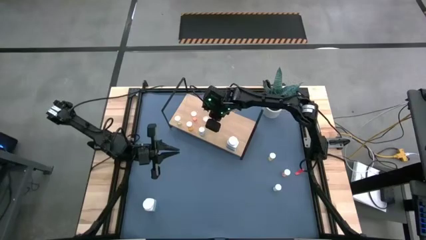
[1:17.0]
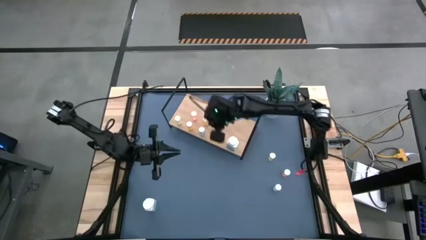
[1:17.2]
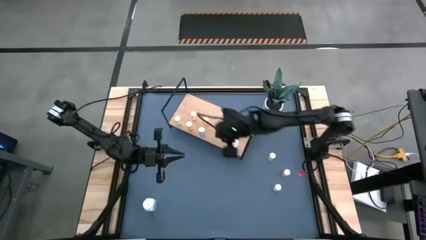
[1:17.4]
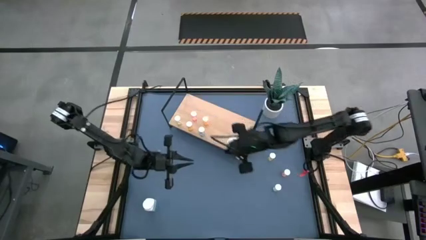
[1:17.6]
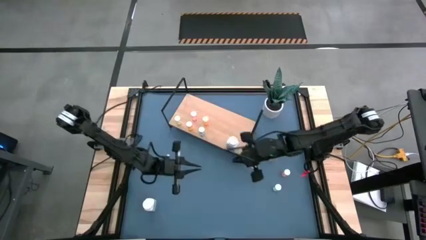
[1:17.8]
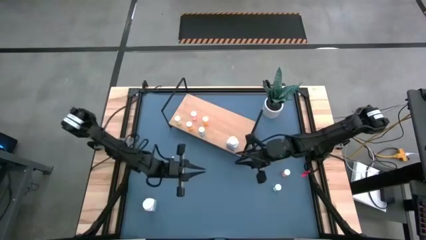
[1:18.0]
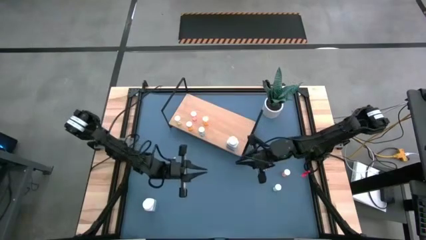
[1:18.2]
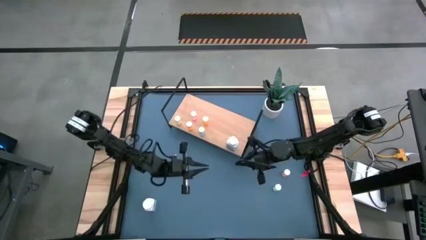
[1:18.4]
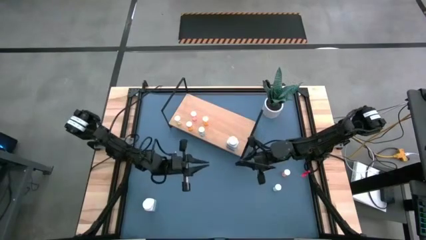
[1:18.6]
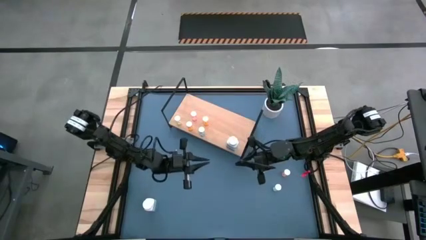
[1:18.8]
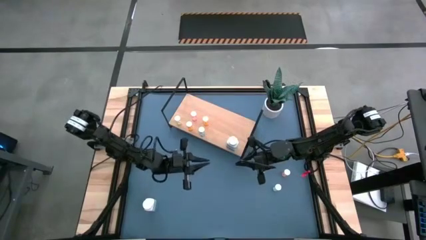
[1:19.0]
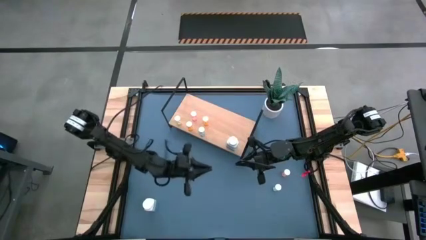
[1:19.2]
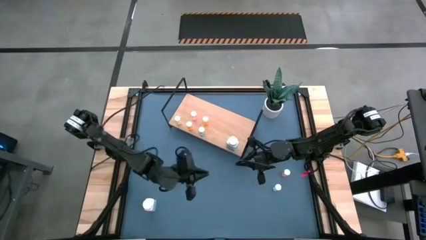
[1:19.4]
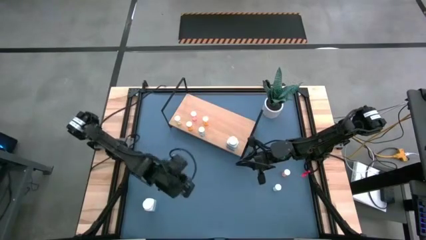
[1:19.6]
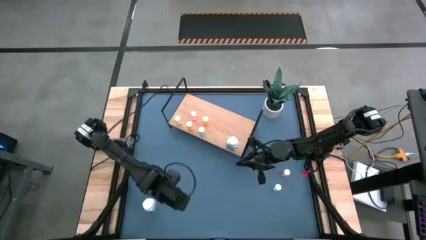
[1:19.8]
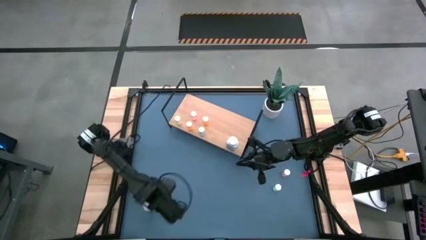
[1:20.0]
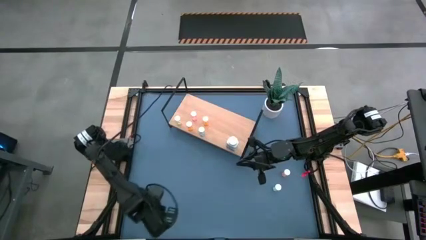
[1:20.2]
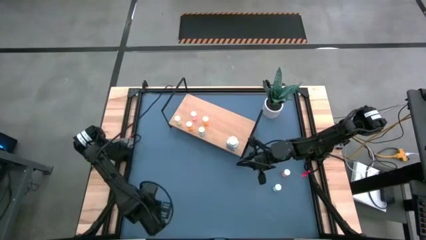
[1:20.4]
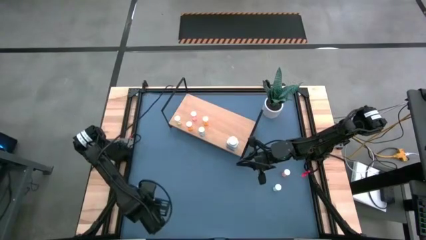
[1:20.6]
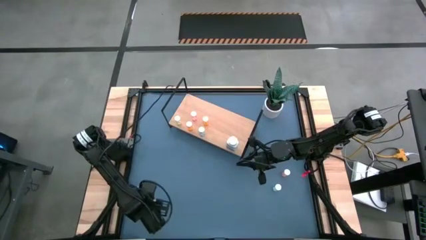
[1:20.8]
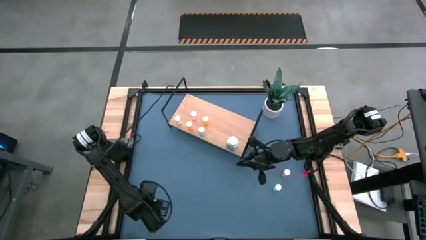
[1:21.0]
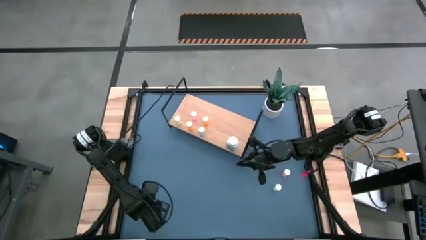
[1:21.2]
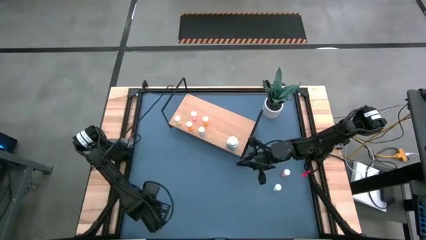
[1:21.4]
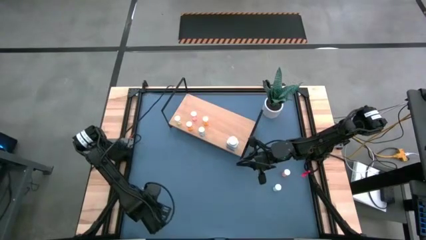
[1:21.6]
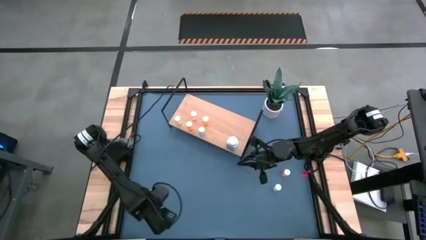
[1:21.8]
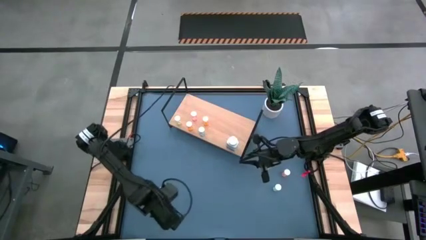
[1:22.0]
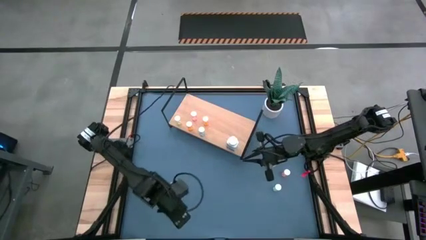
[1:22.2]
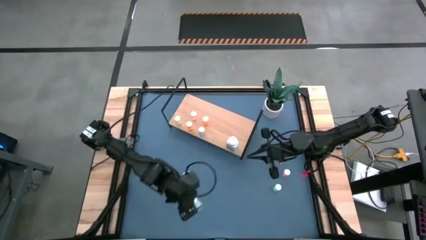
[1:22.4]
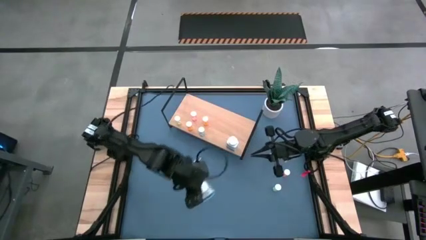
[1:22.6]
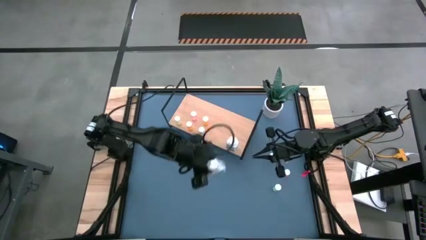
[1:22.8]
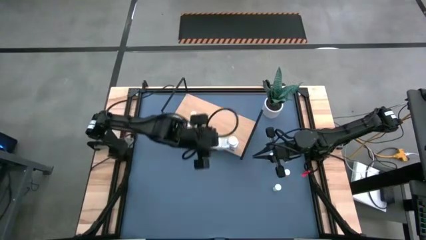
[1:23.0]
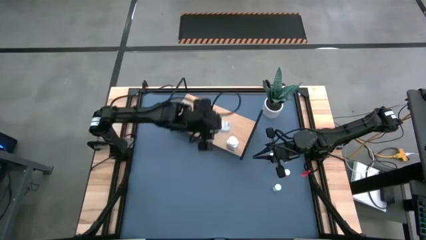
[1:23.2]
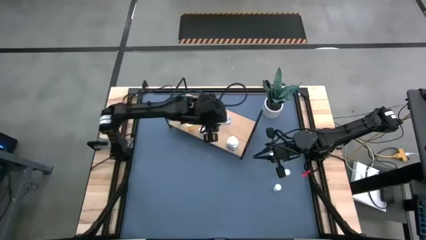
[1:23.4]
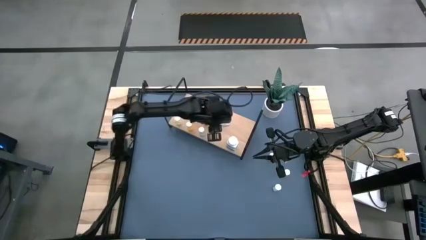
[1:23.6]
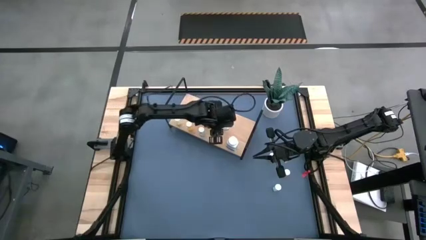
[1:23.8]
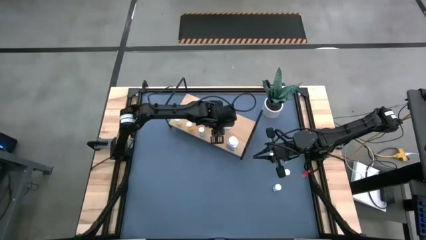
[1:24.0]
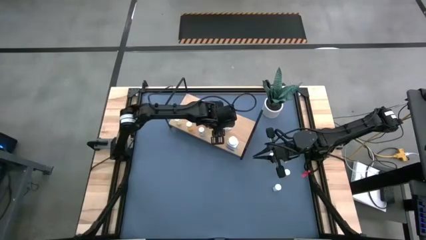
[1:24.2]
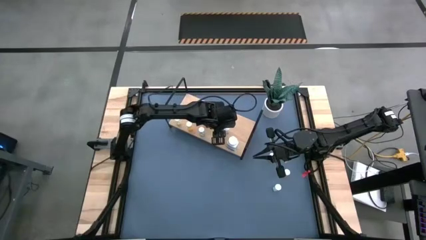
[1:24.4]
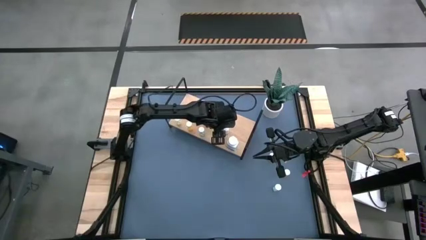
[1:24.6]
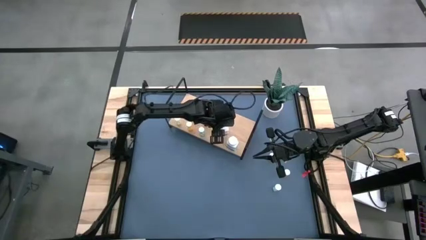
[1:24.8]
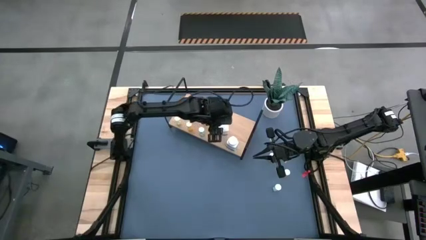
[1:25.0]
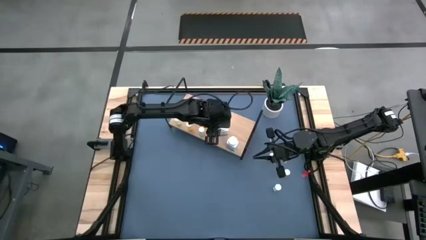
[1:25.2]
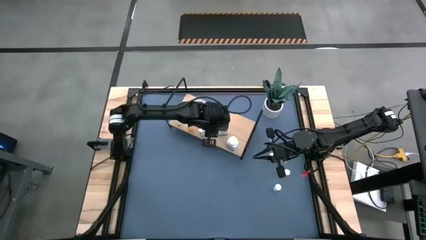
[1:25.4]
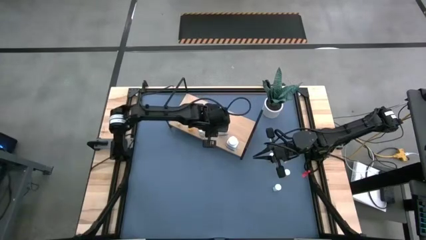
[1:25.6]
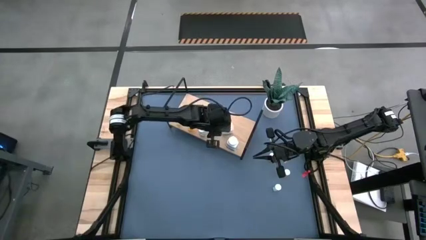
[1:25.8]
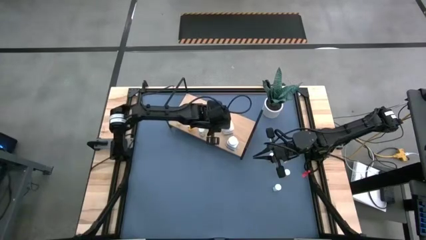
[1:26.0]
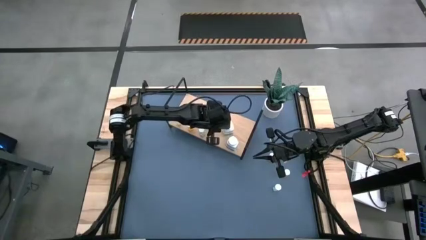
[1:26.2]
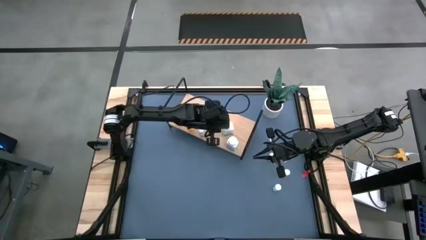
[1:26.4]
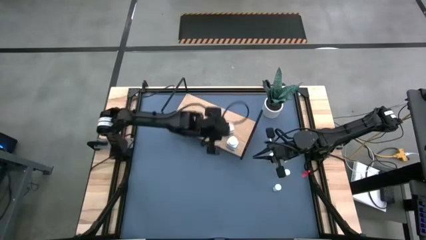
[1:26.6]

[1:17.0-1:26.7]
Task: Pick and place medicine bottles onto shelf by color
Put the white pill bottle on the shelf

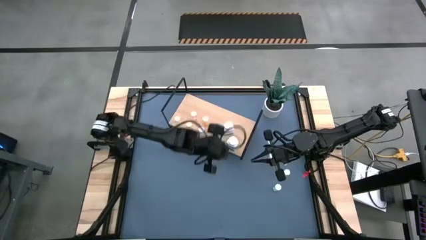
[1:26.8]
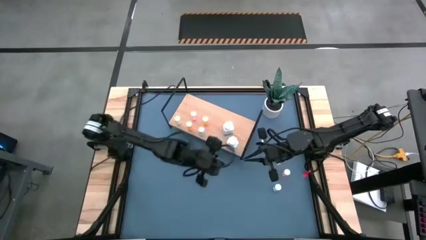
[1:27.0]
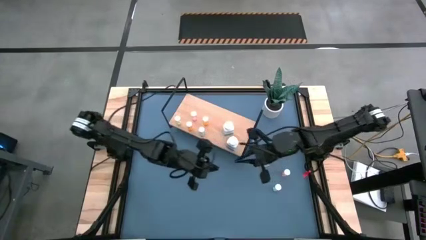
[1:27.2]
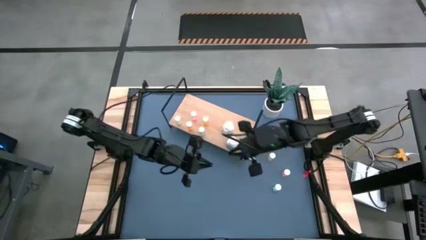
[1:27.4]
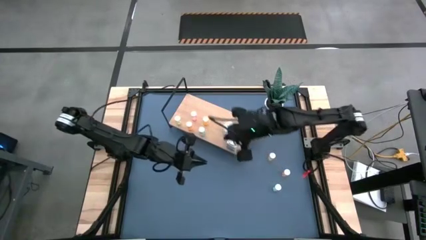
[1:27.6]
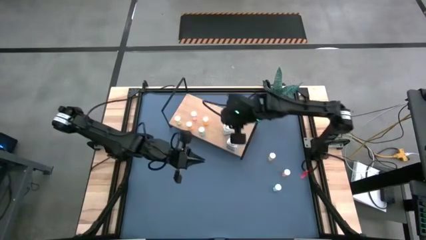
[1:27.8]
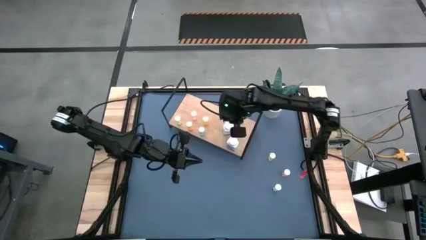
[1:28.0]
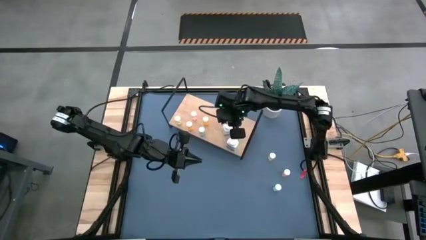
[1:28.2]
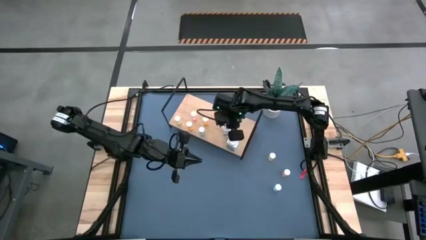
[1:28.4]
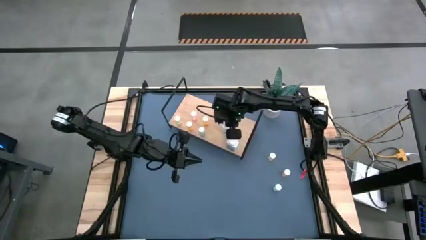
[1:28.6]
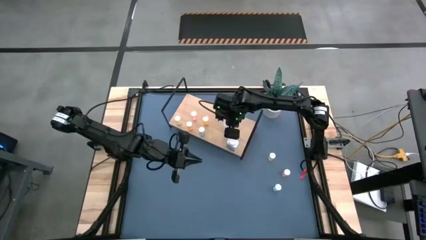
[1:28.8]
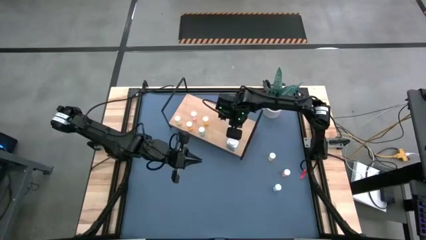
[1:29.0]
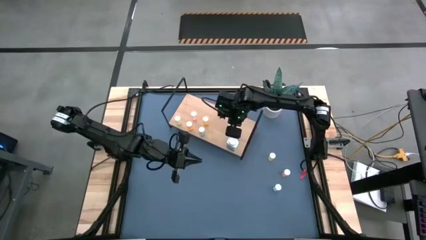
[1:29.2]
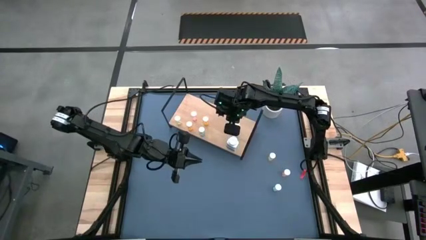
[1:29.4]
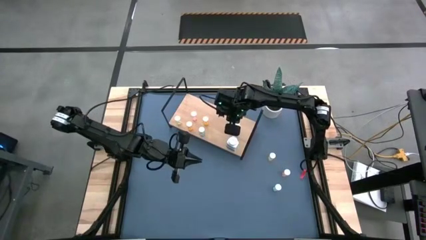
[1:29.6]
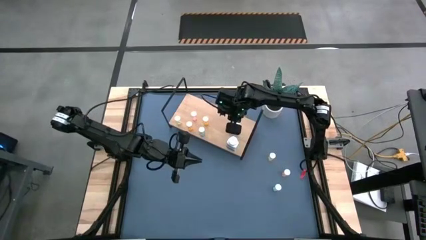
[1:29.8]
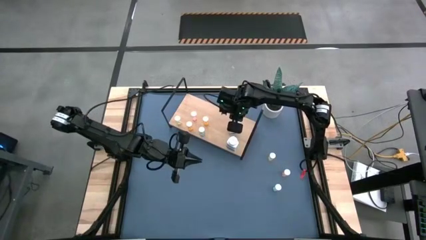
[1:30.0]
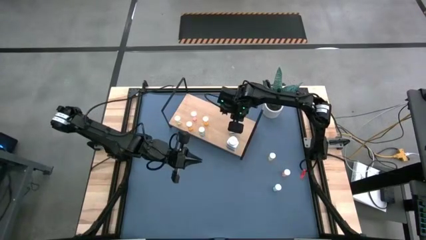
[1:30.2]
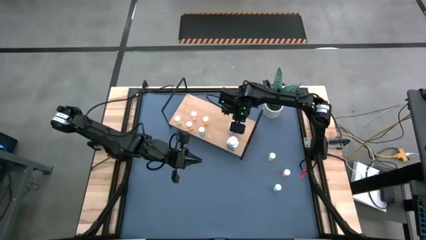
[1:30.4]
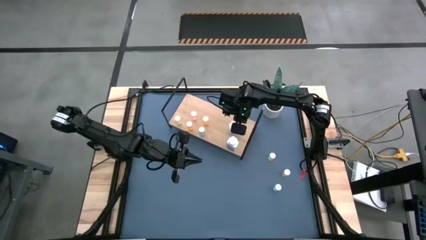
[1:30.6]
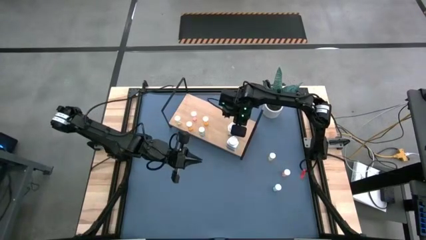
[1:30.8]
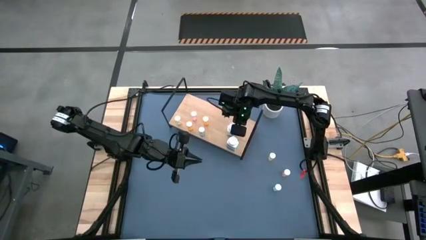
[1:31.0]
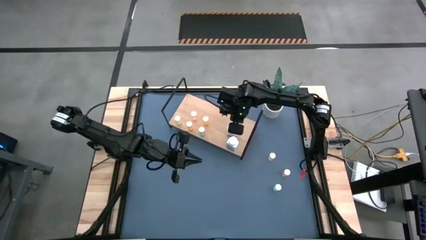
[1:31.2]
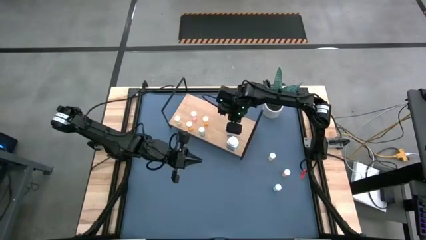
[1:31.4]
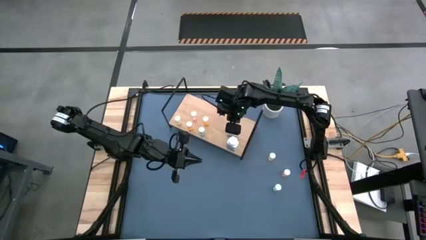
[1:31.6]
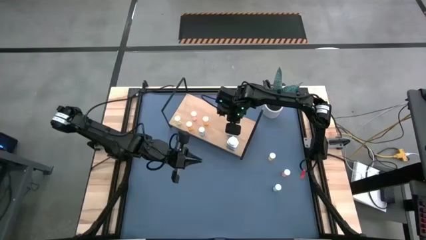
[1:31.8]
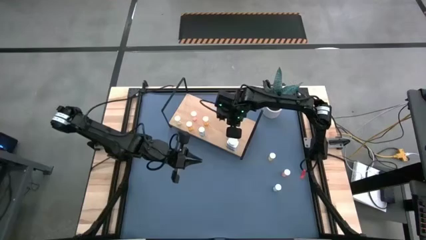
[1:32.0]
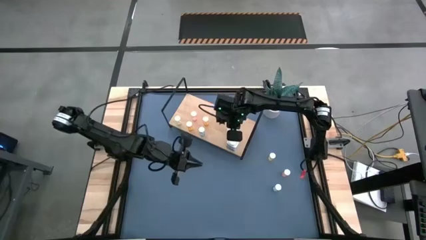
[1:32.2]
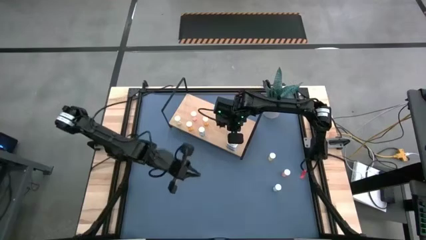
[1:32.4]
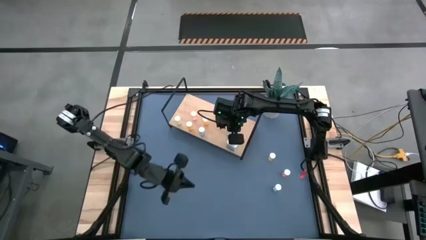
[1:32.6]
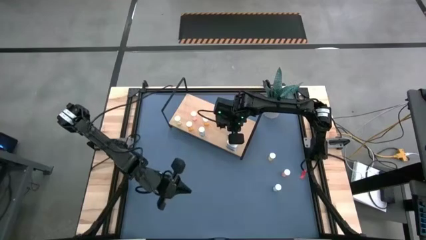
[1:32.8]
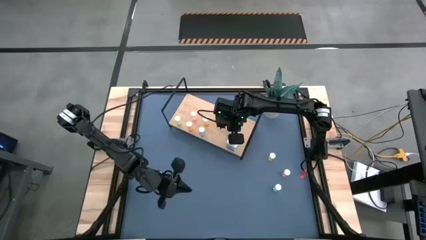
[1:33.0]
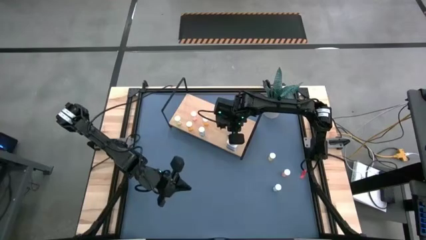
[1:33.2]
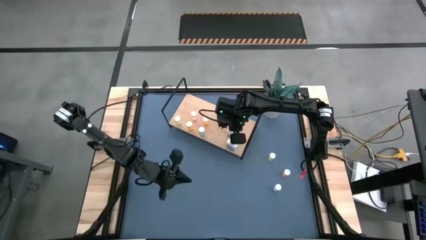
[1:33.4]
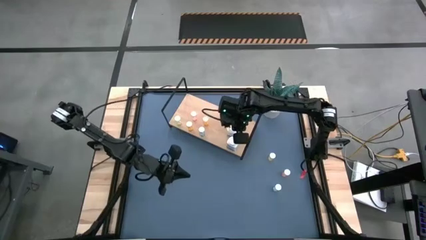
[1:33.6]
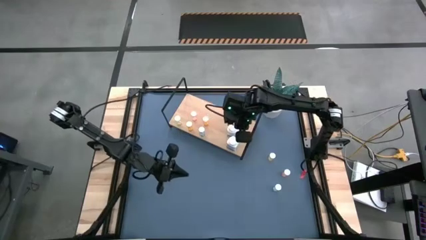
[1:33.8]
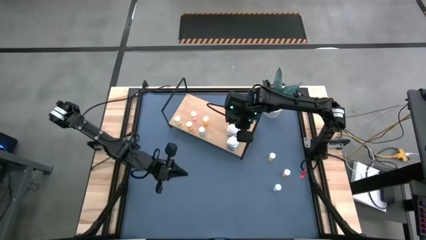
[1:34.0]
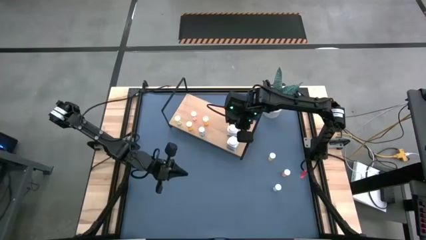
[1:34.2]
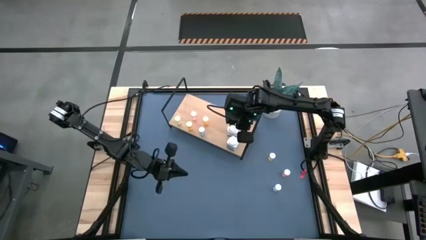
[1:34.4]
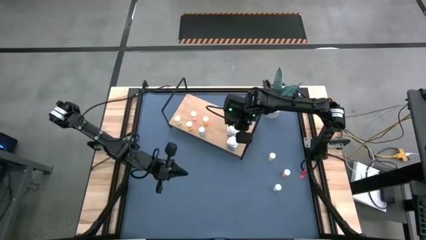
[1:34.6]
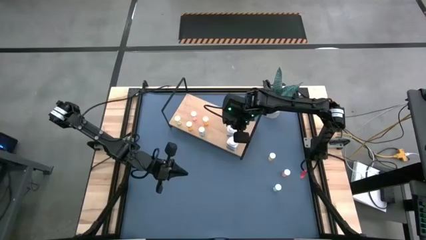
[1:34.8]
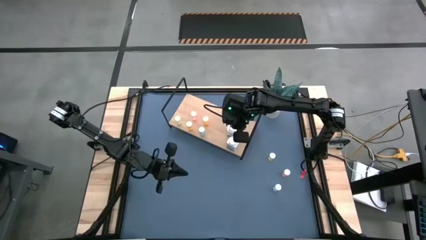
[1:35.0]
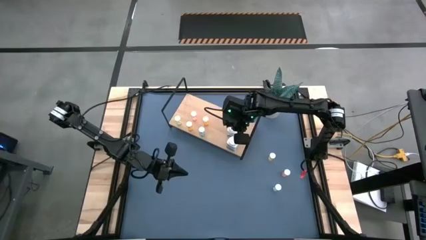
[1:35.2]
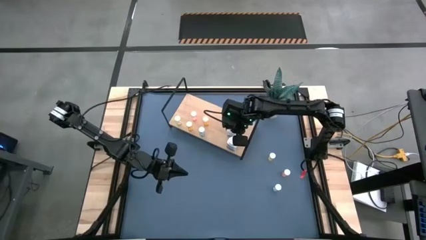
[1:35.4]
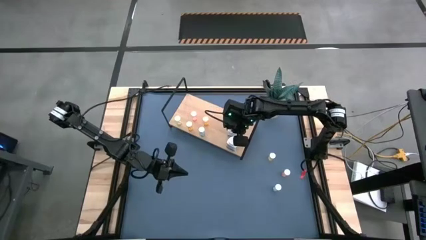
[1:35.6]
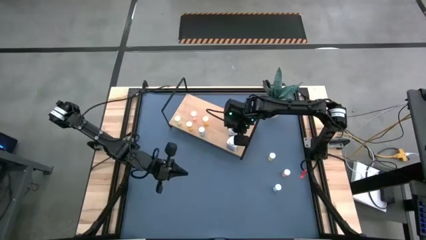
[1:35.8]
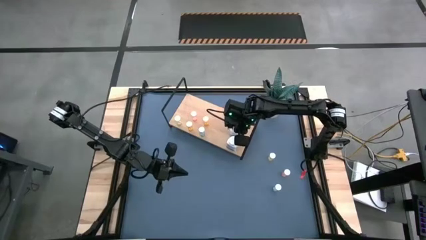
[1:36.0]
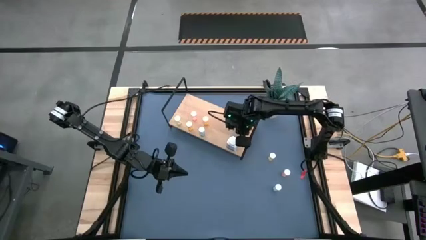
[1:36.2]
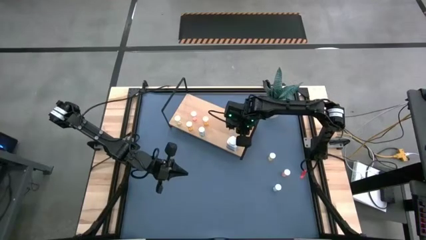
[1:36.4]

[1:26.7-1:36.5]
Put the white pill bottle on the shelf
